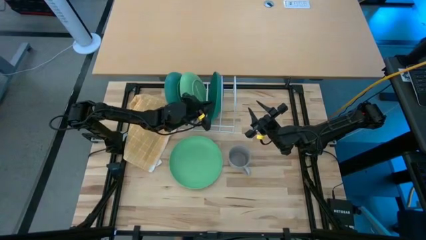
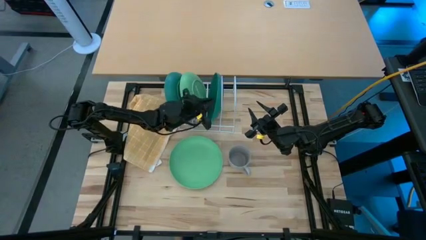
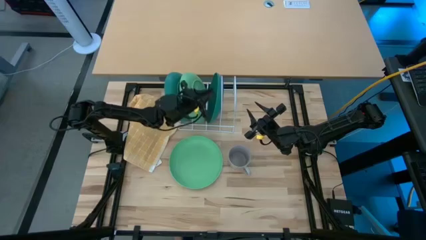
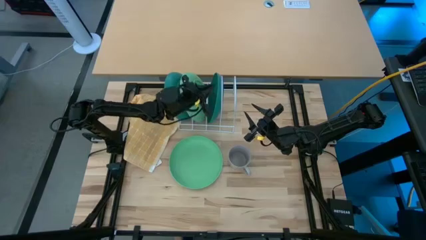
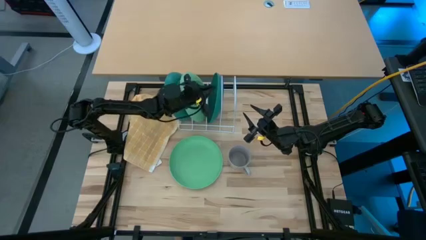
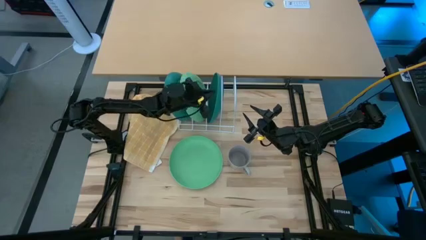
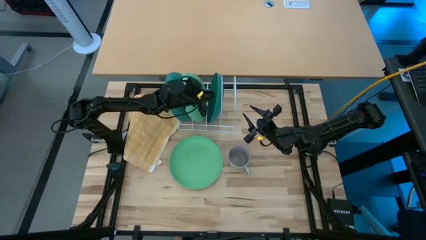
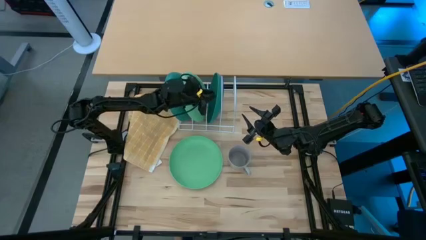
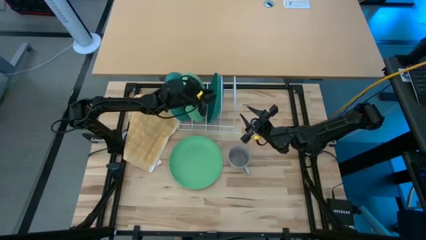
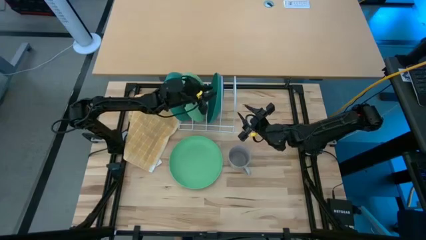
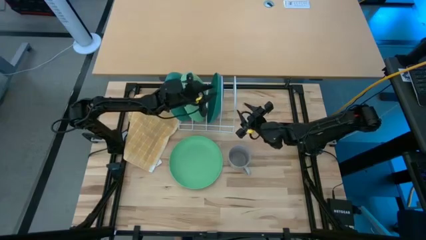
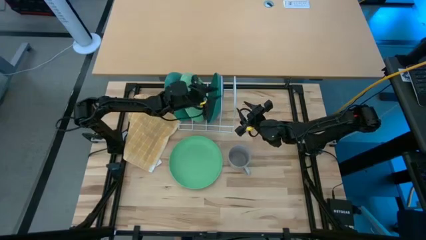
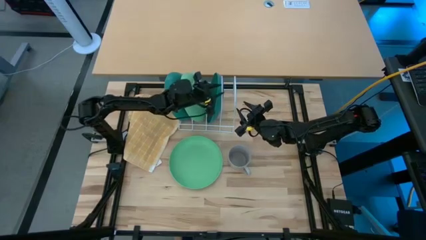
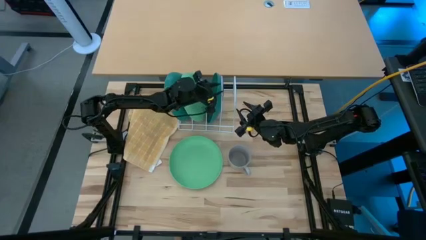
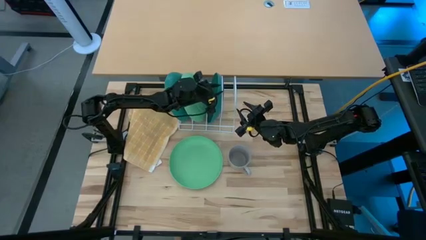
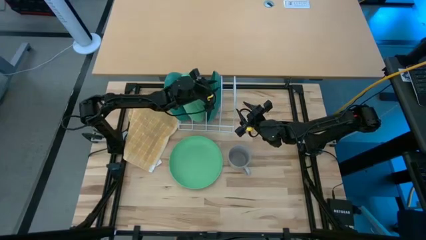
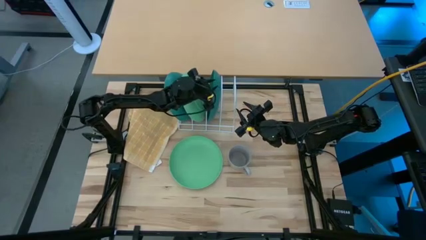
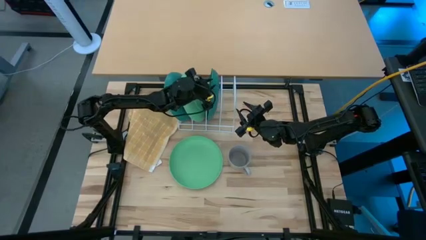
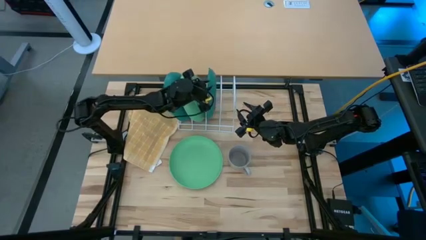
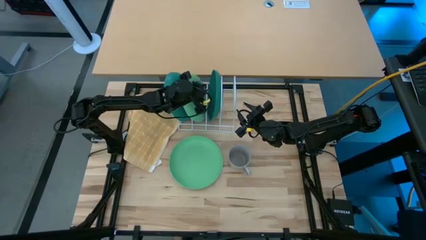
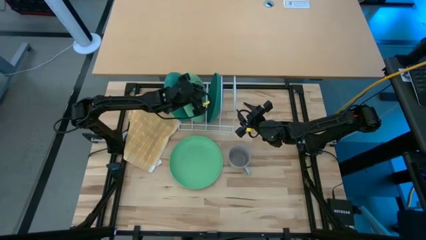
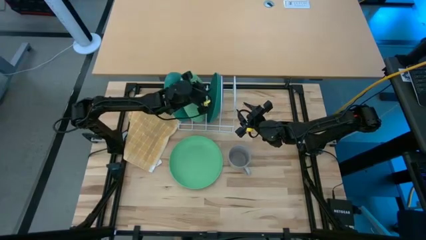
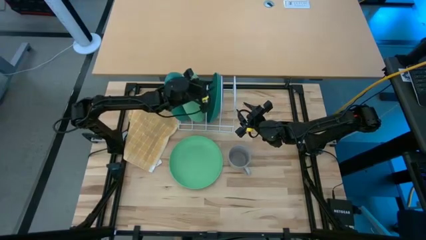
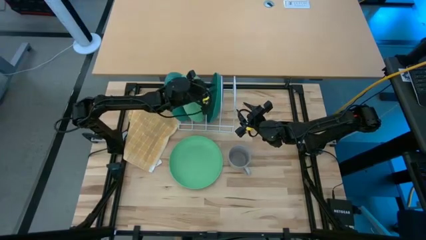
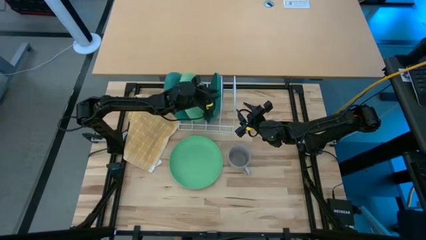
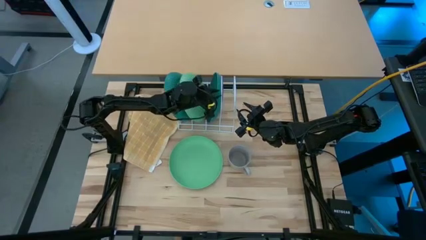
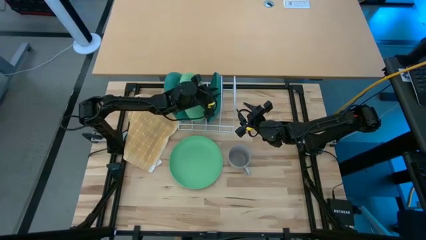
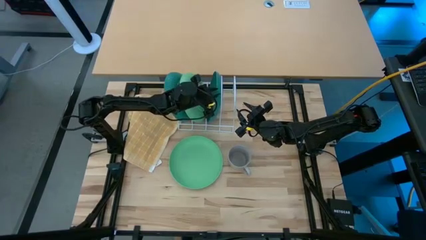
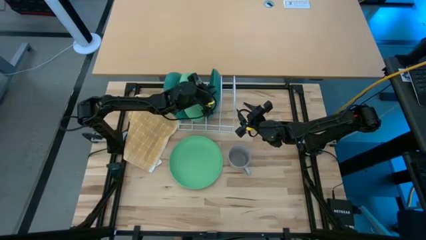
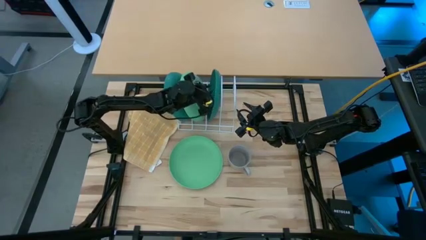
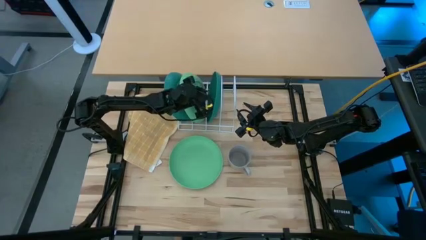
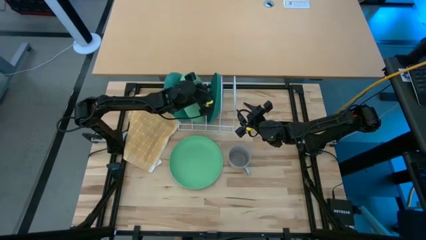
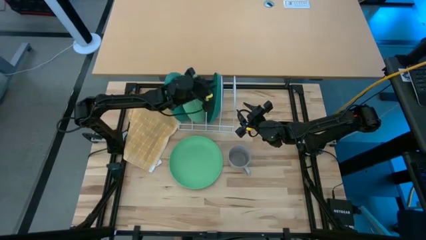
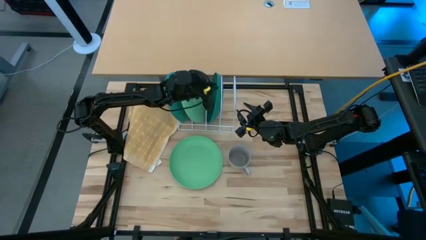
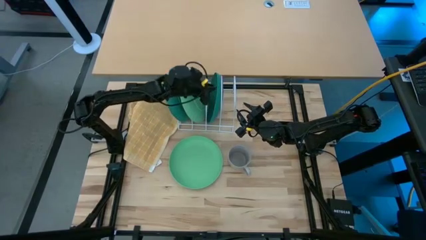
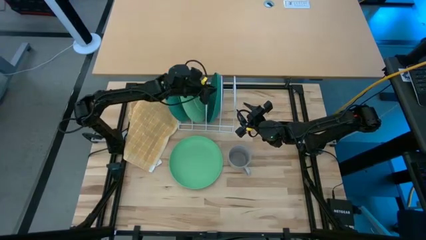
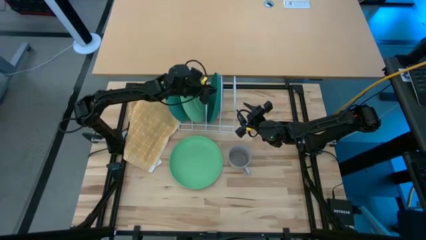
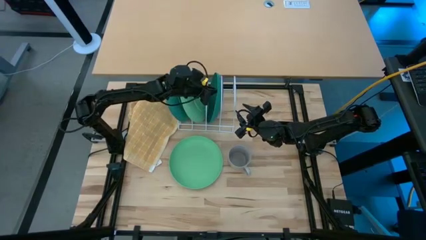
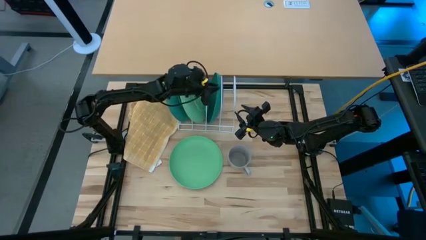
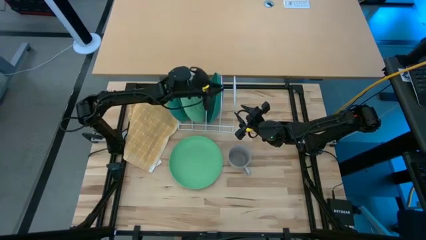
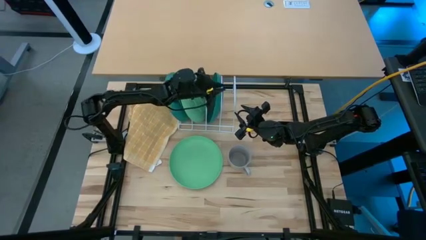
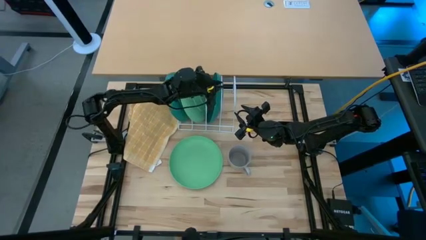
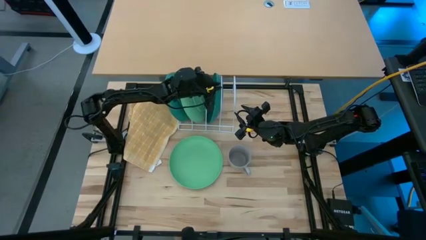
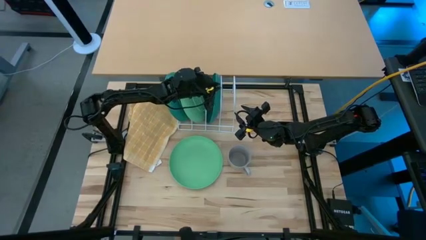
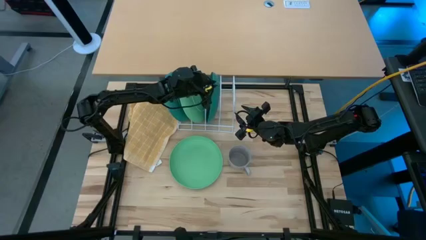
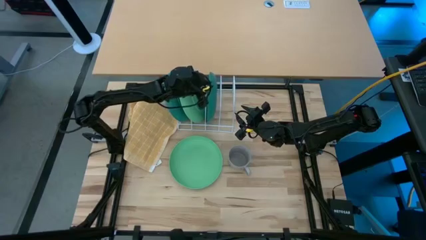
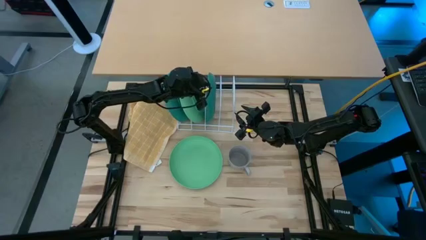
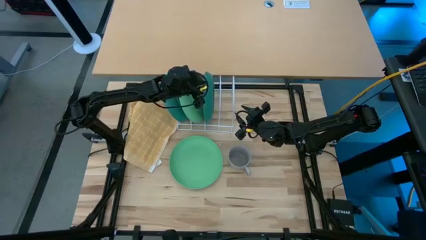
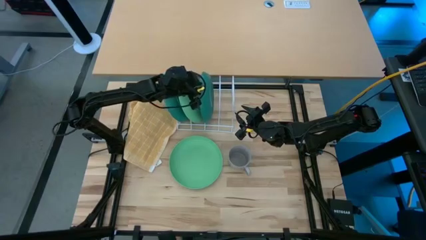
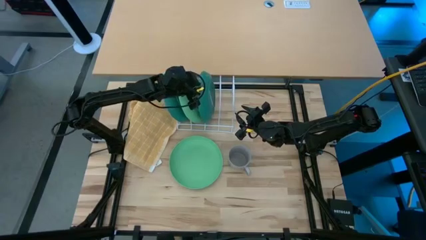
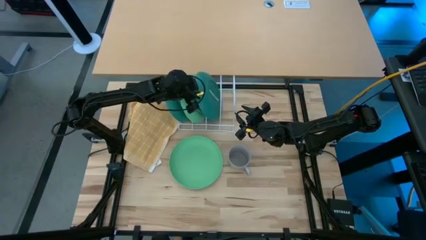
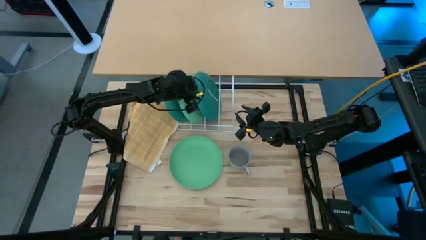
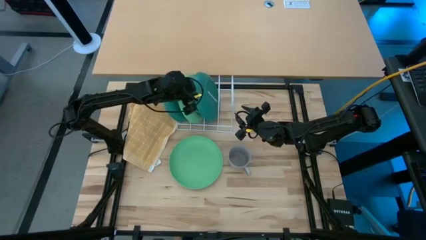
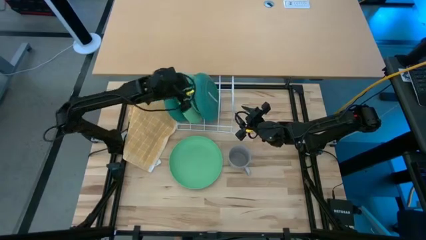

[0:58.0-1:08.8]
Task: Sort dishes
Put the blue plate into the dish rack

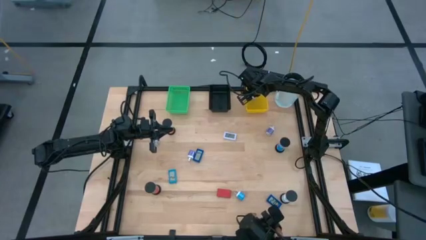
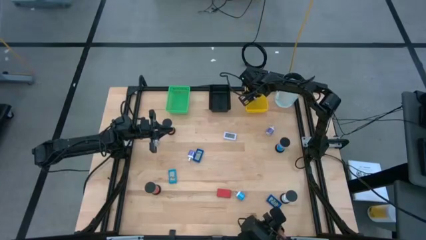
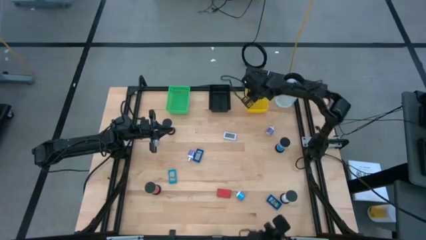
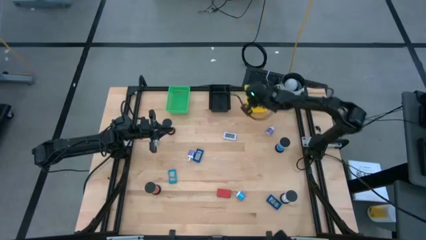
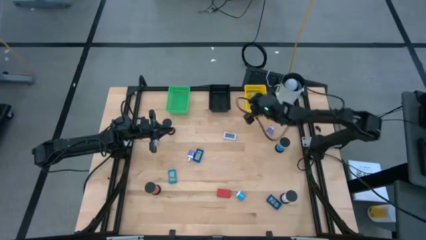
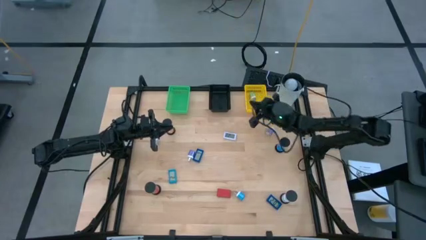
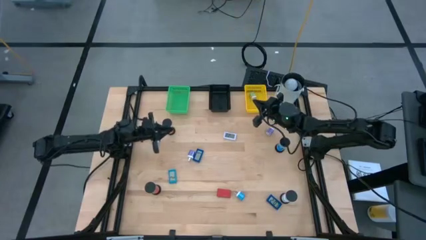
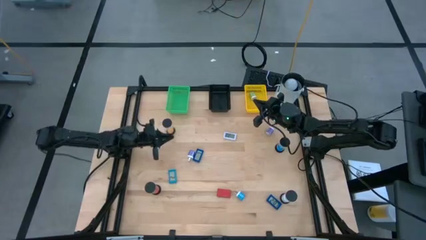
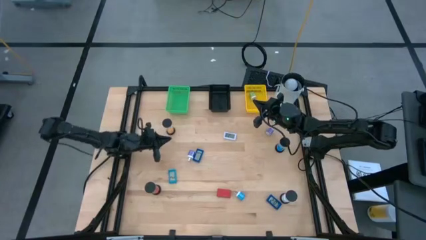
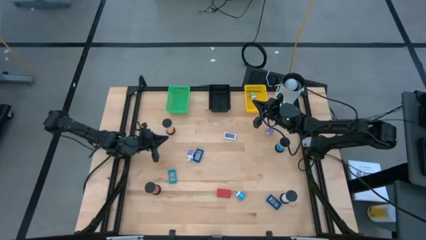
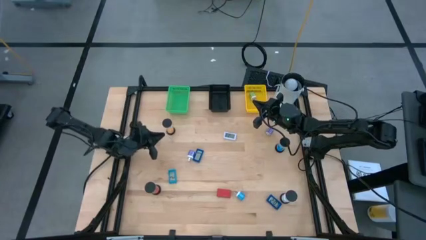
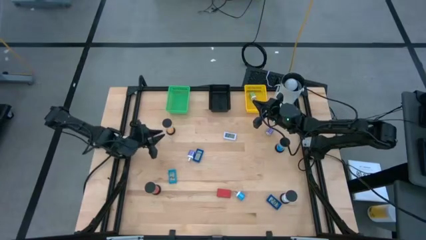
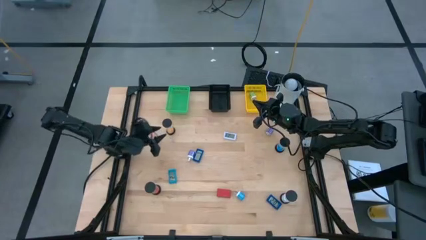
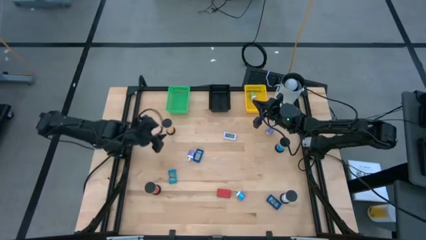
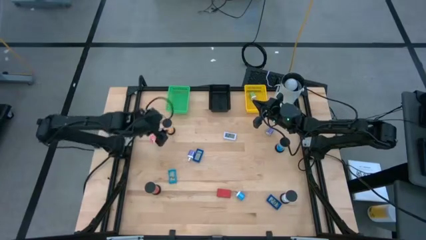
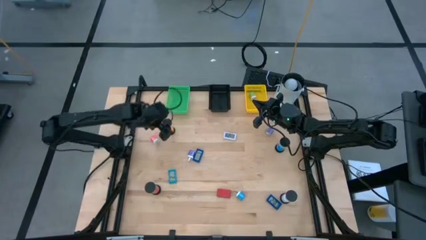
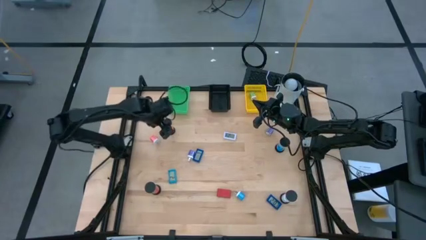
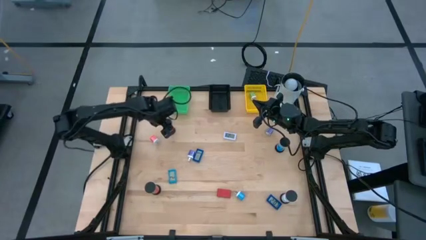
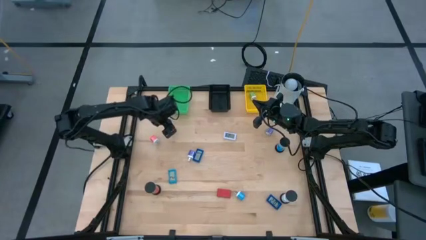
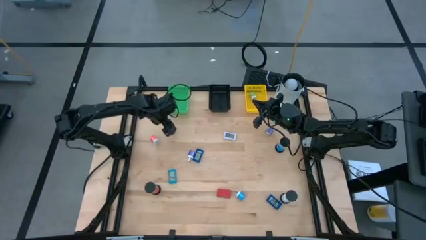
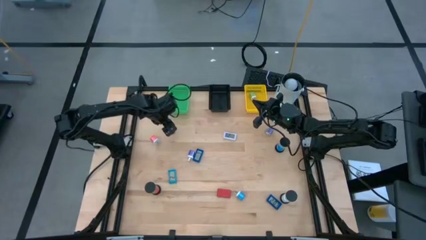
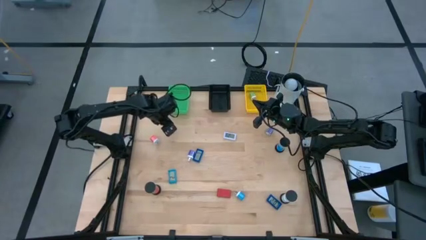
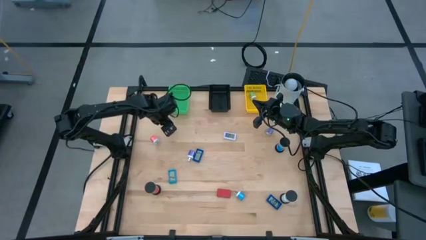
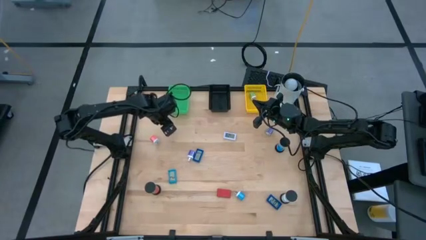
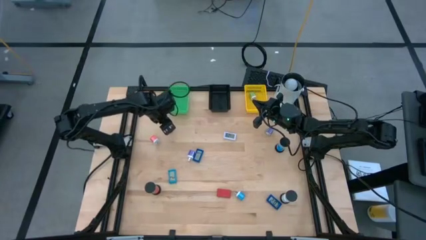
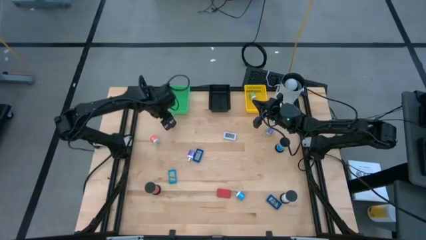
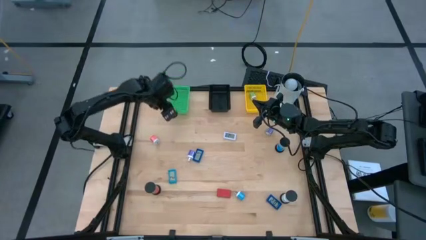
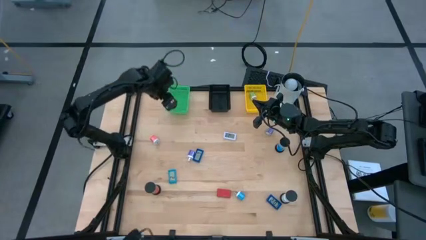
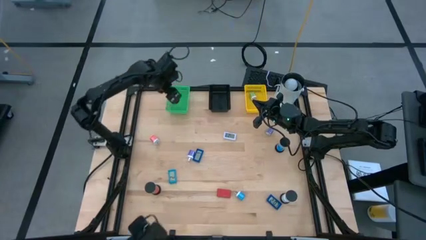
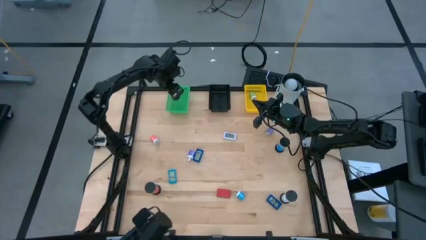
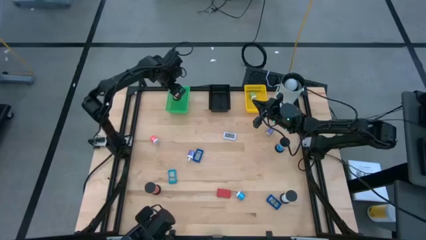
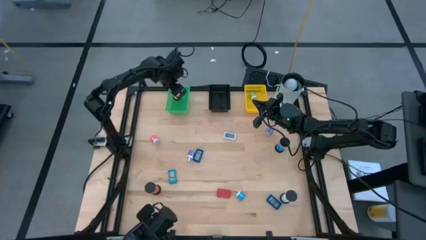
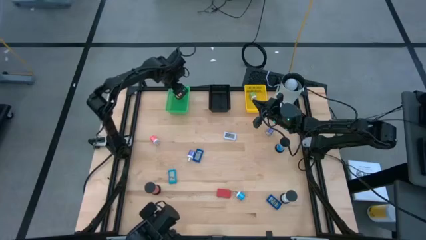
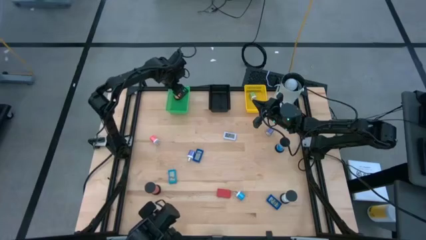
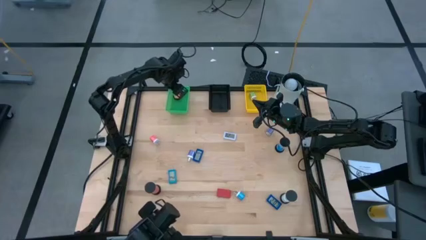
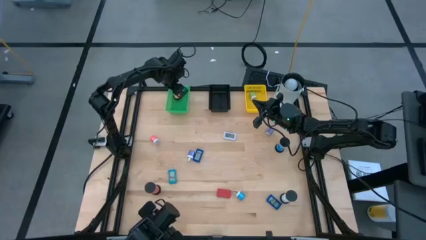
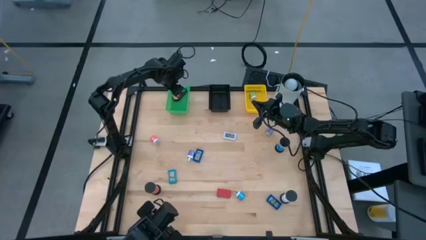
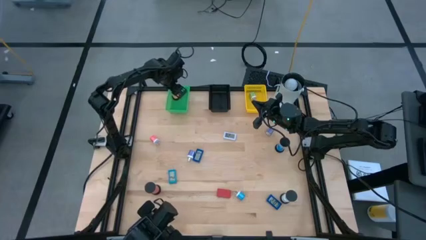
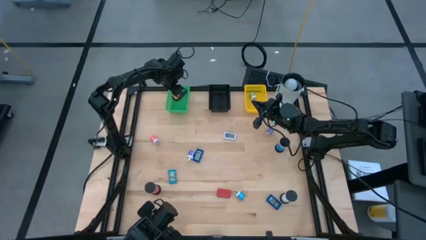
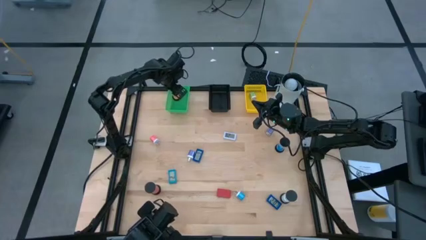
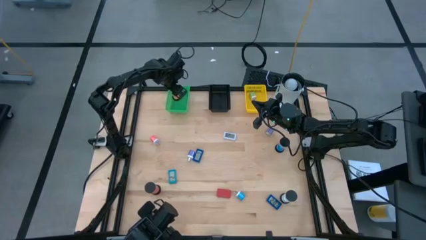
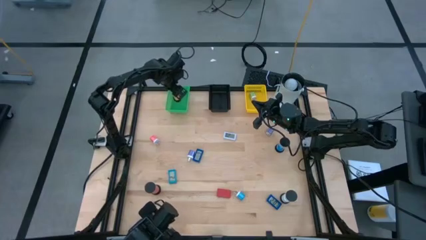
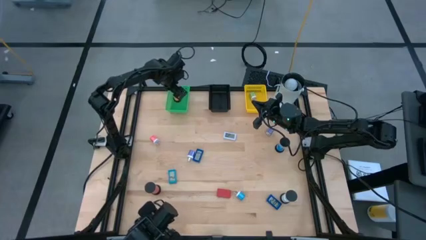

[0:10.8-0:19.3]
Task: Pick & Place Office items
Put the orange hourglass into the green bin
